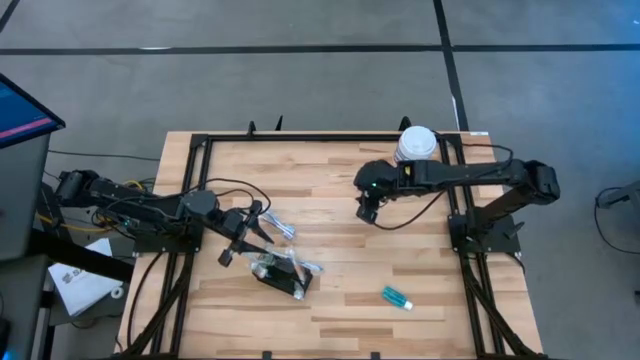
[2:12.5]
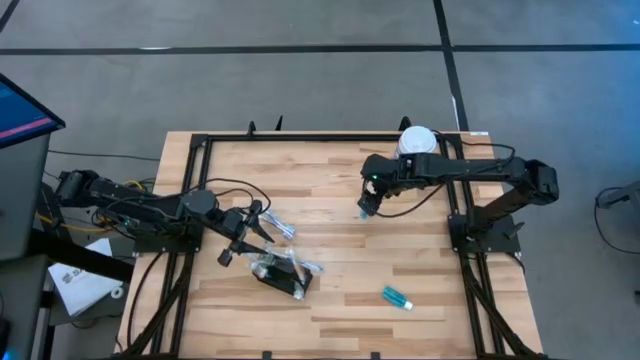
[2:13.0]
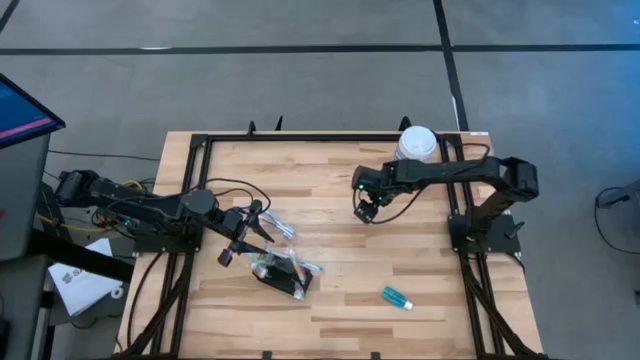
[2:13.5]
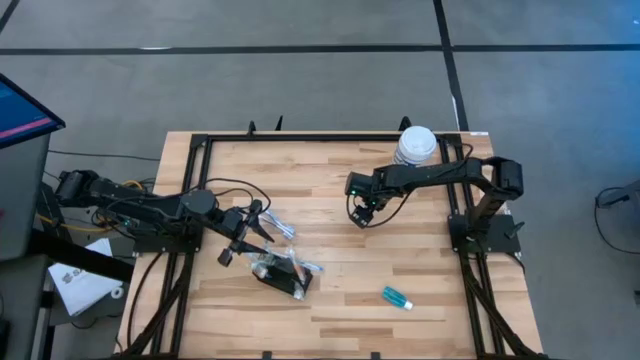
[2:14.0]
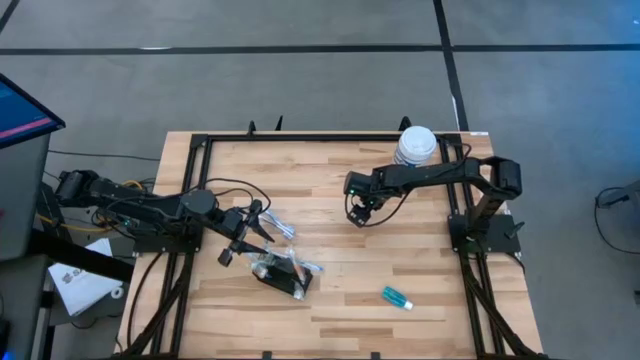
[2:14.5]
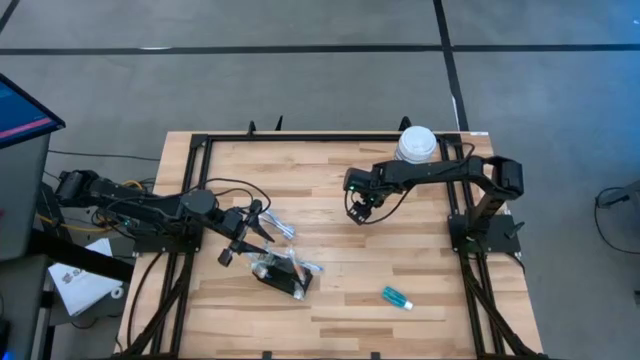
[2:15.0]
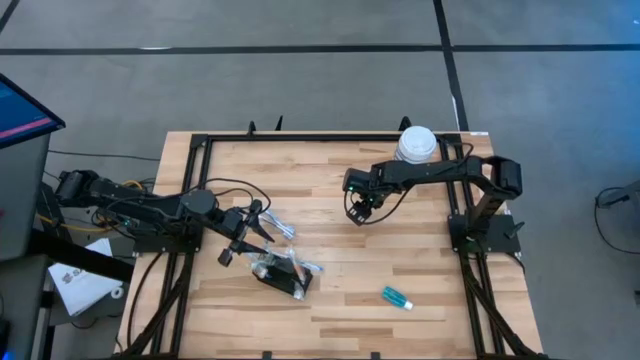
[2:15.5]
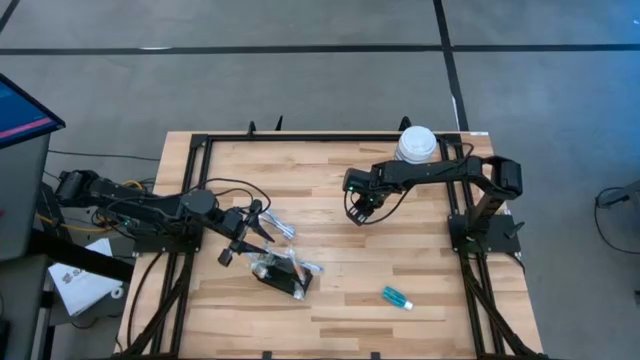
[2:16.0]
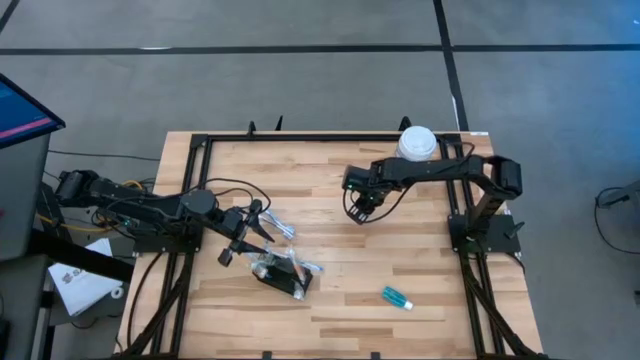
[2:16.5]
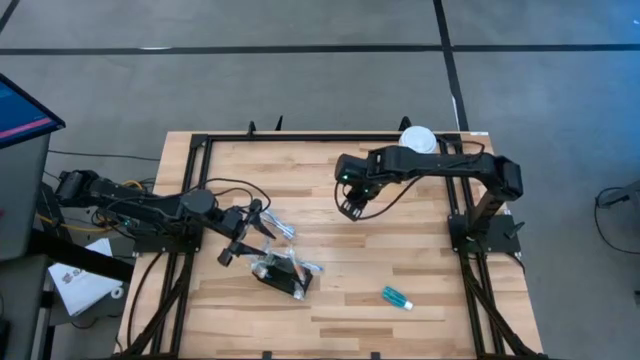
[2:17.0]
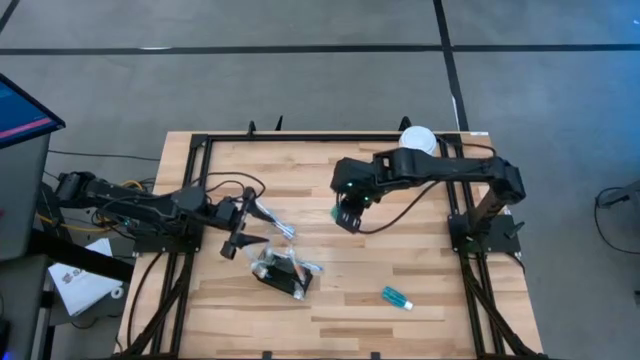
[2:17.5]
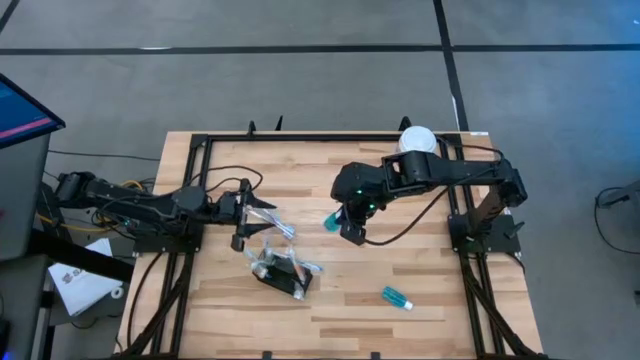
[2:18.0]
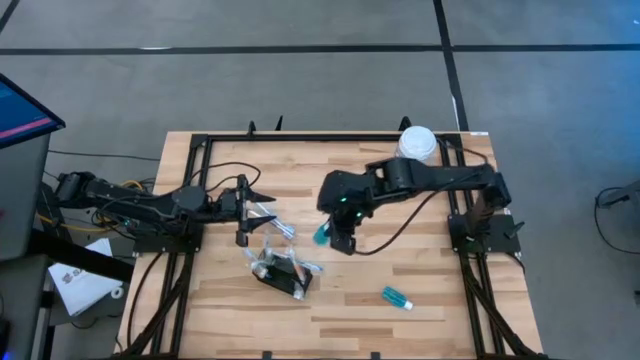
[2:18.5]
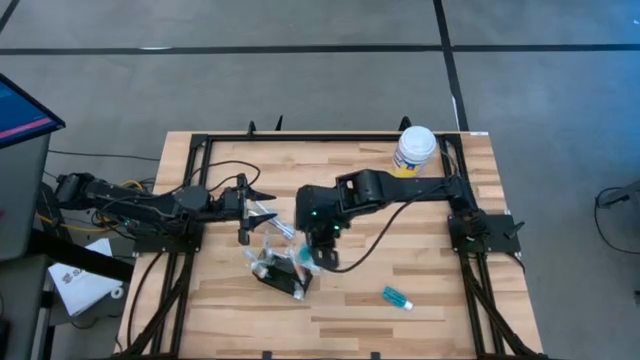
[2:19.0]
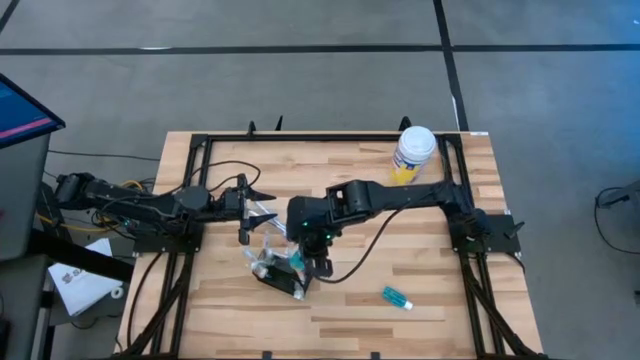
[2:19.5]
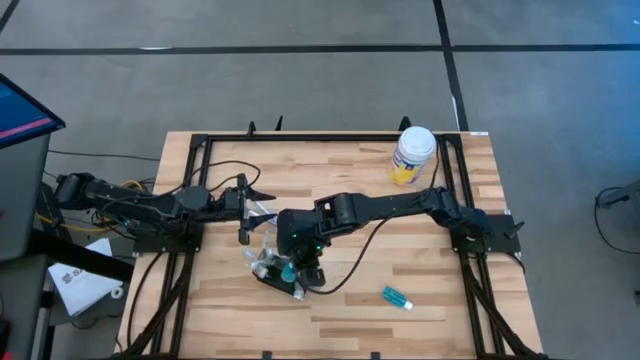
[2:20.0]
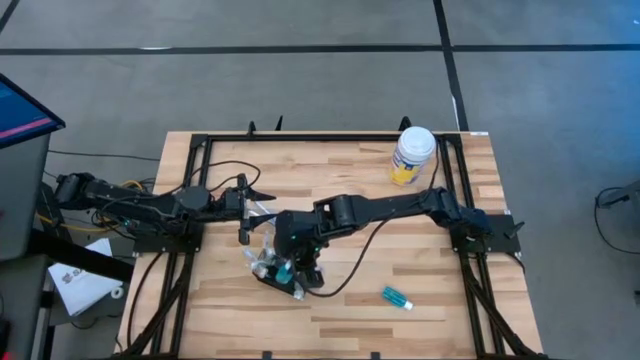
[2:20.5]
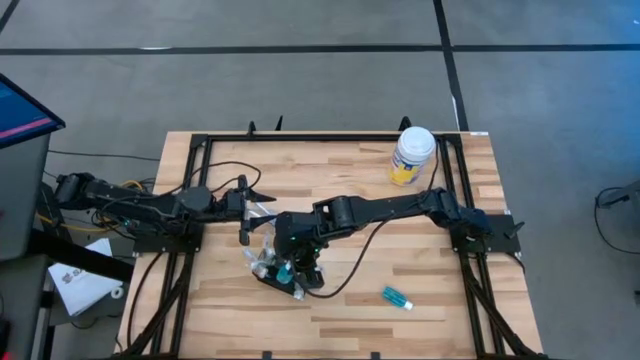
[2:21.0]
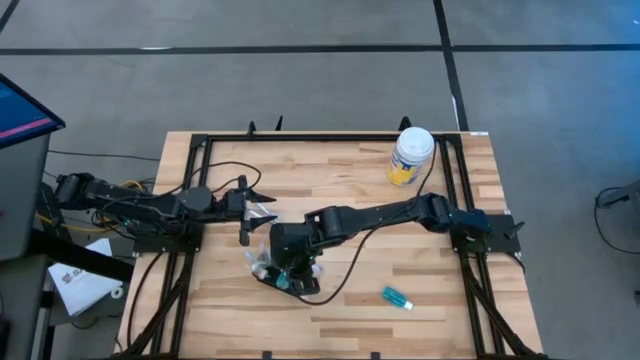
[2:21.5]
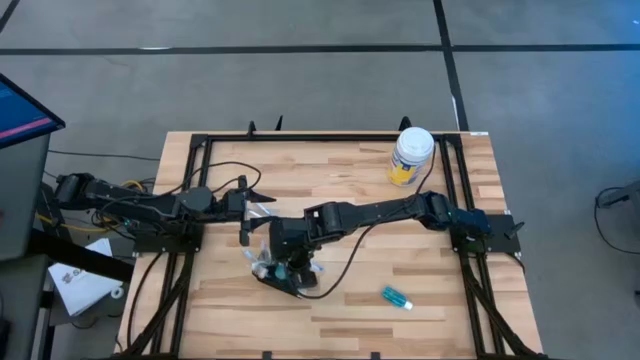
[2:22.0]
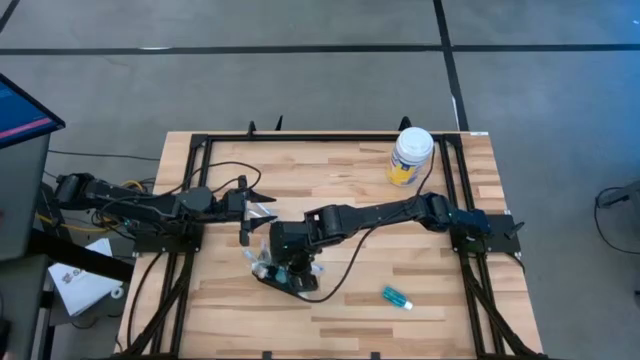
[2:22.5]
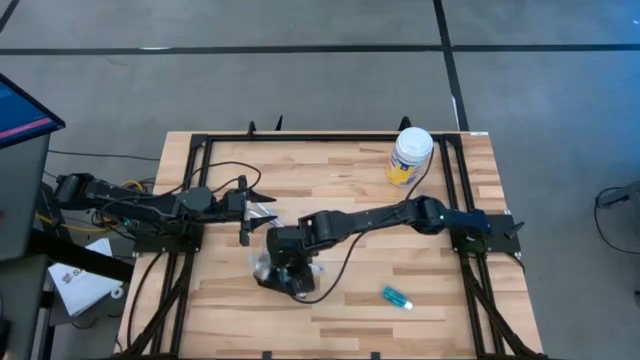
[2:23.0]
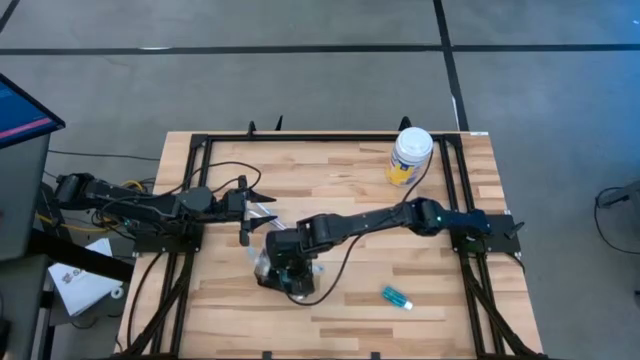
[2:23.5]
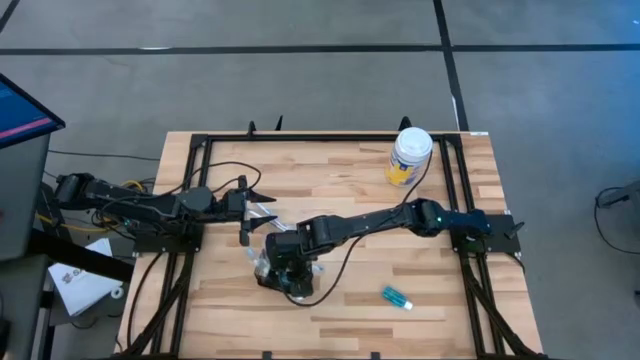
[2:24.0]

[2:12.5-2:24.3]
Task: Pick & Place toothbrushing station
Put the mouthwash into the mesh organizer
